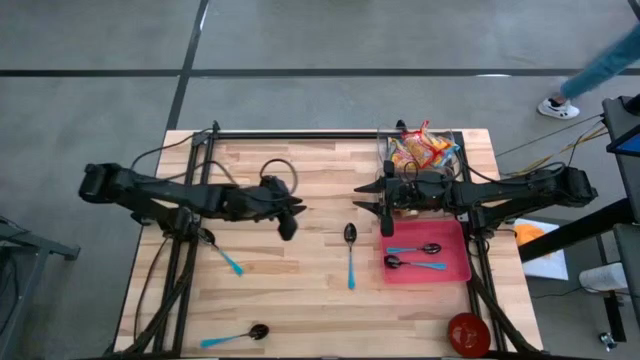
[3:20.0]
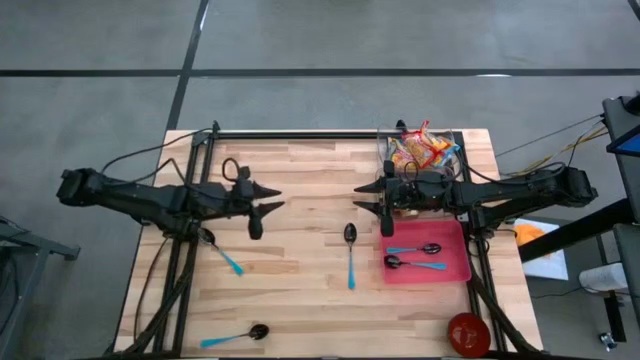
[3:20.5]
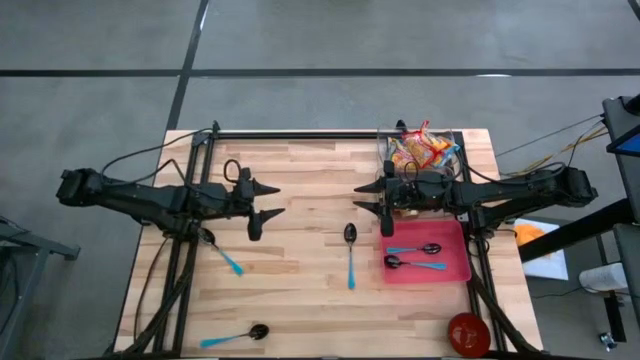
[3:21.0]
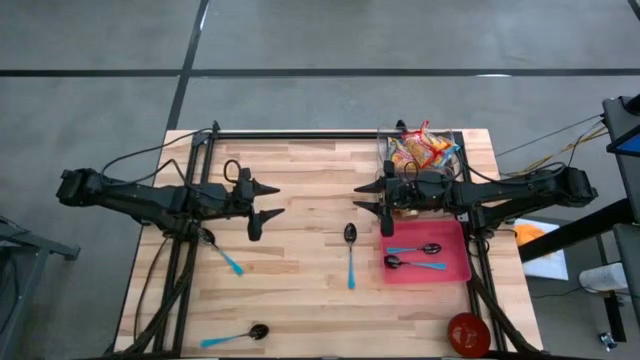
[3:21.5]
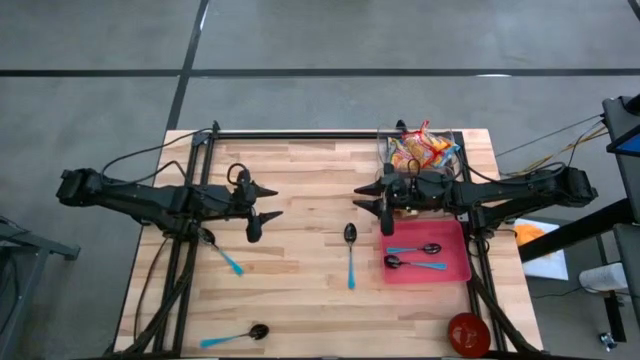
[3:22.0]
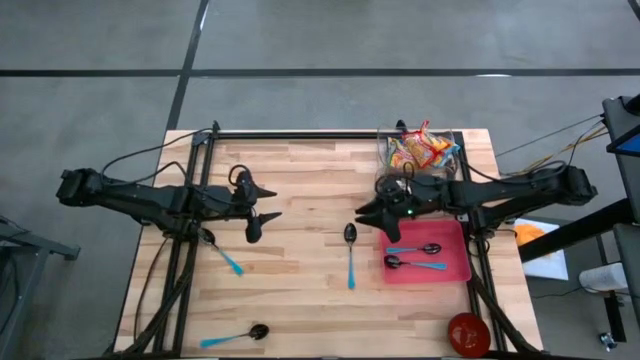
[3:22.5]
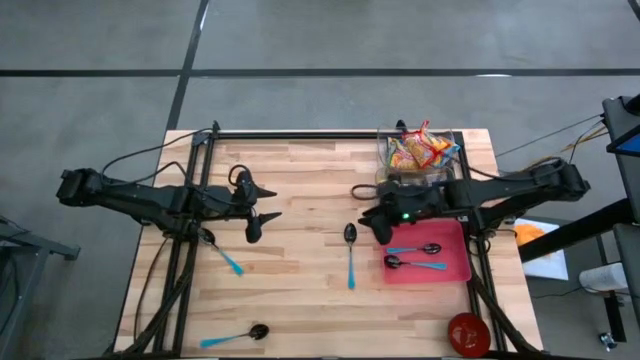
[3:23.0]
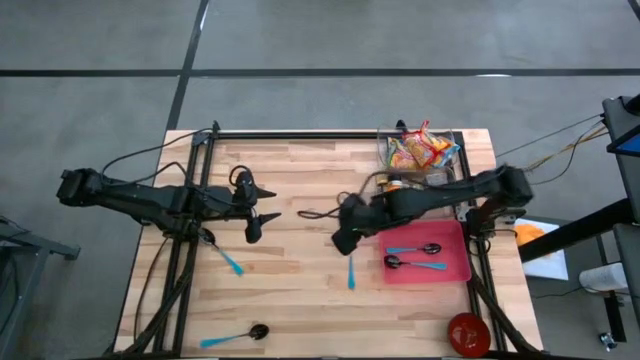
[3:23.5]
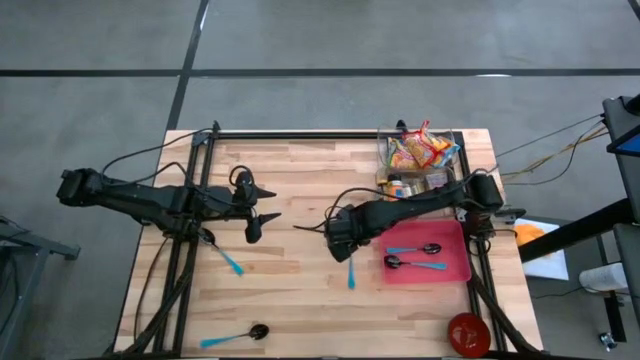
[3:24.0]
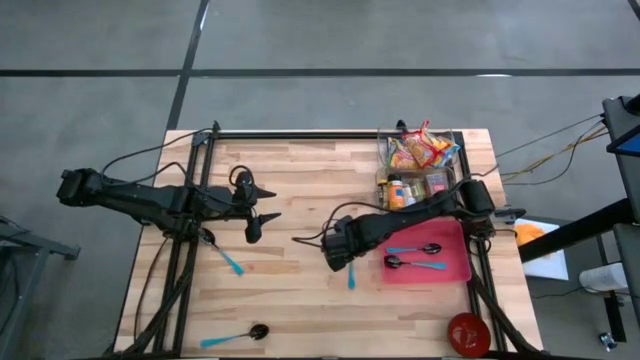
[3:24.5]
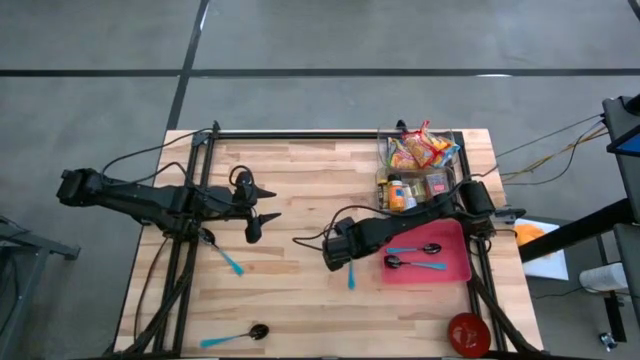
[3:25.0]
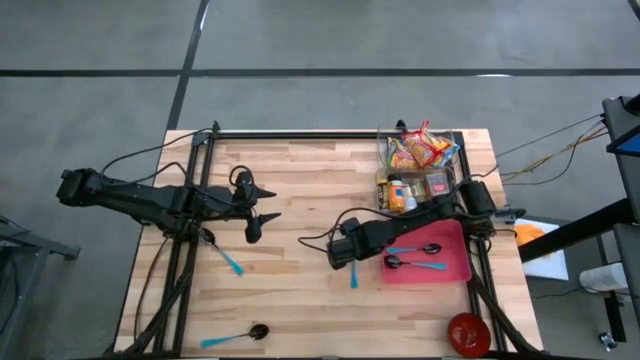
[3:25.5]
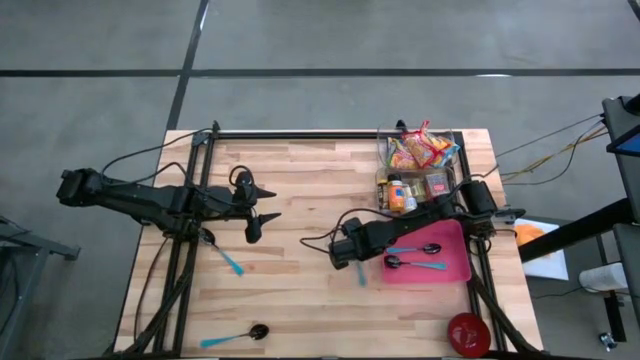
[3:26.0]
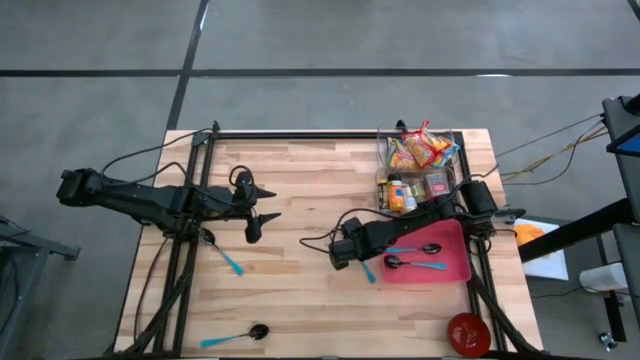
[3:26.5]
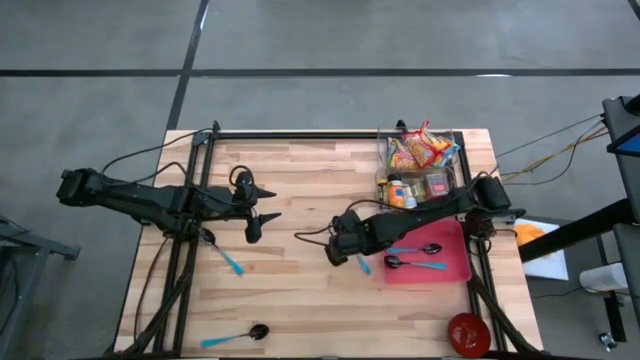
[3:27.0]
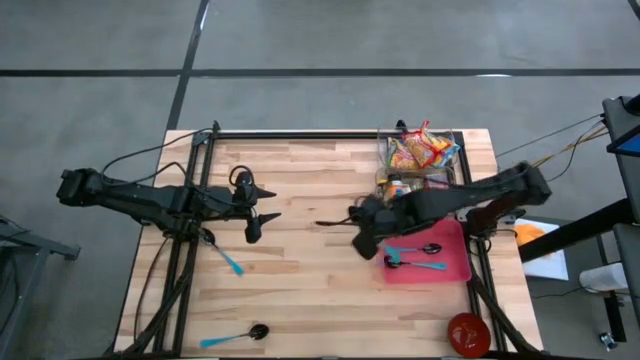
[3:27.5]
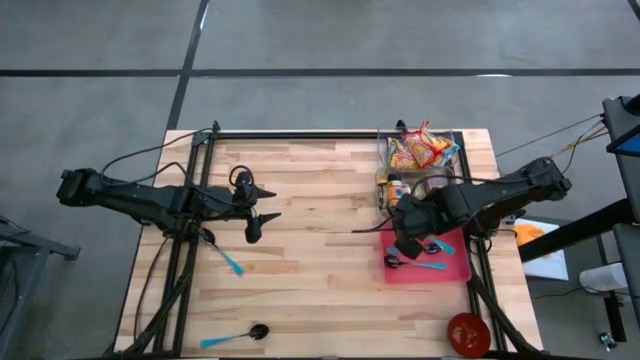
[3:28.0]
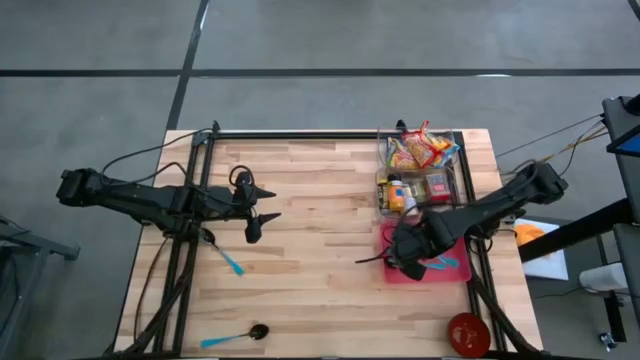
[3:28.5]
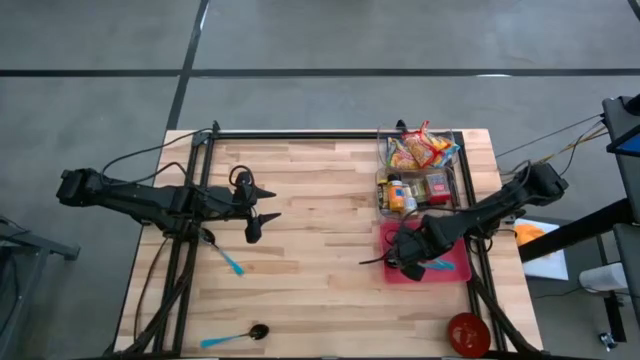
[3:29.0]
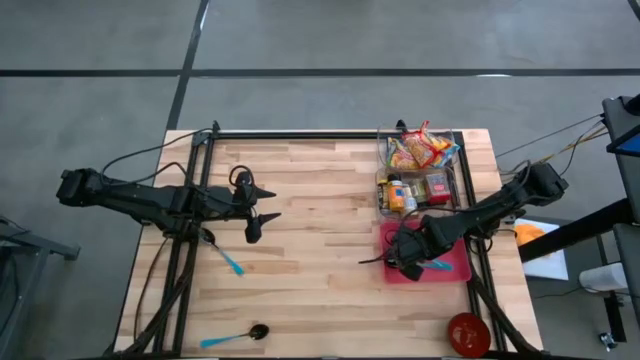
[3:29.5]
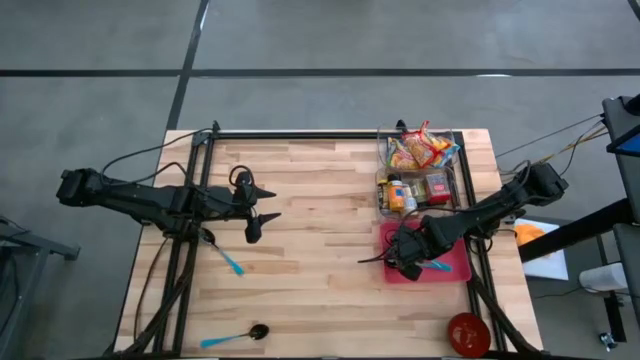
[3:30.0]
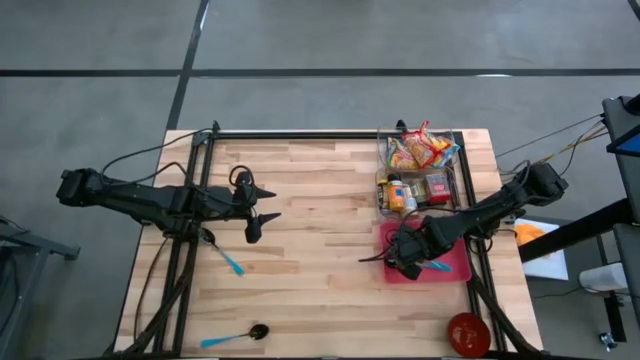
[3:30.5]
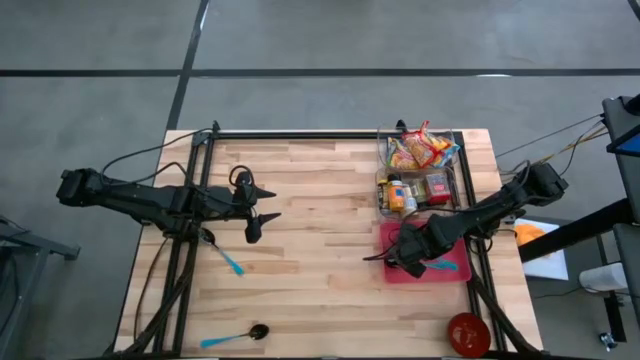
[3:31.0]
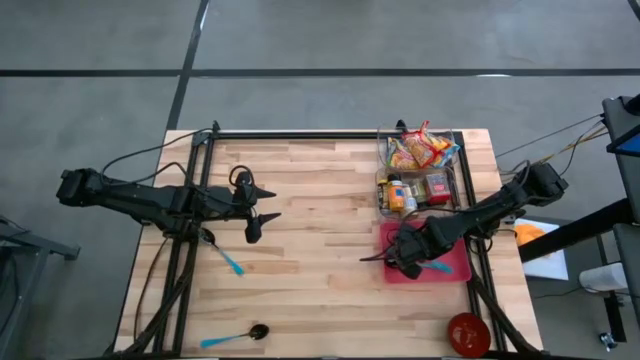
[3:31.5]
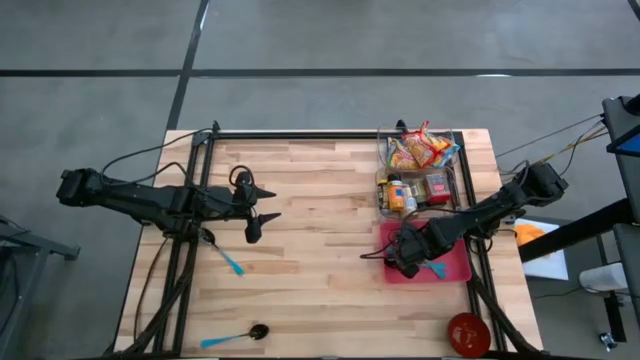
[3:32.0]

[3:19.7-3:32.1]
Put the blue spoon into the red bin

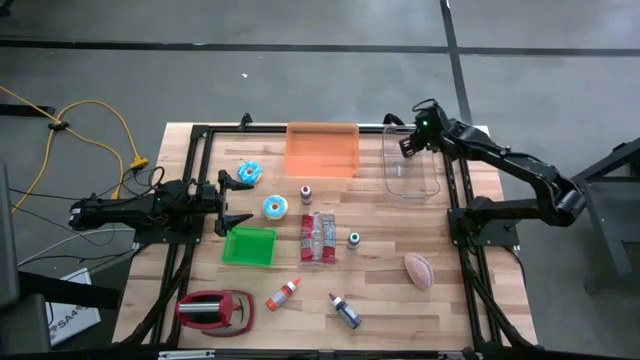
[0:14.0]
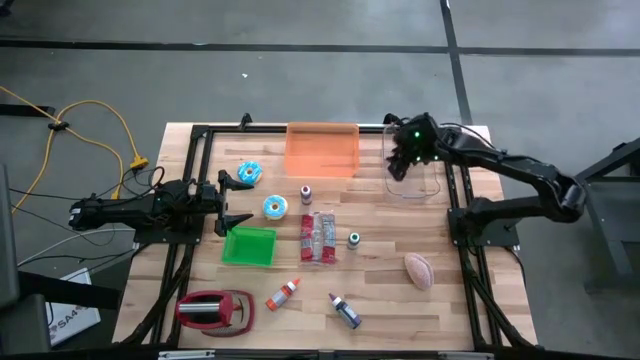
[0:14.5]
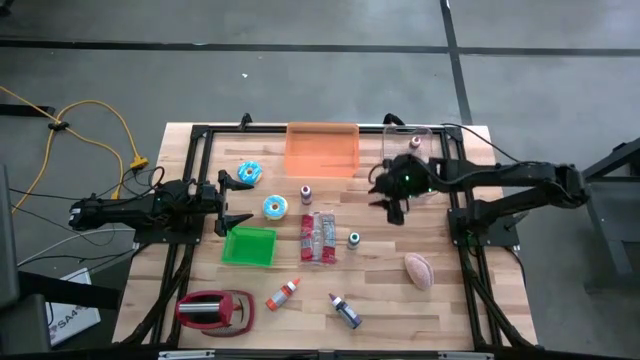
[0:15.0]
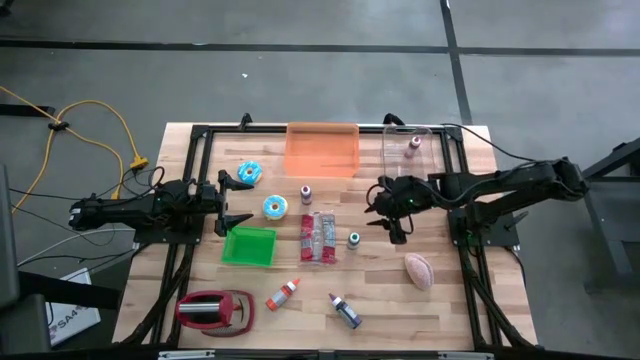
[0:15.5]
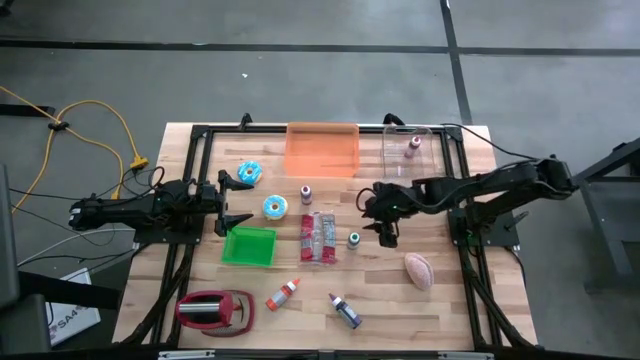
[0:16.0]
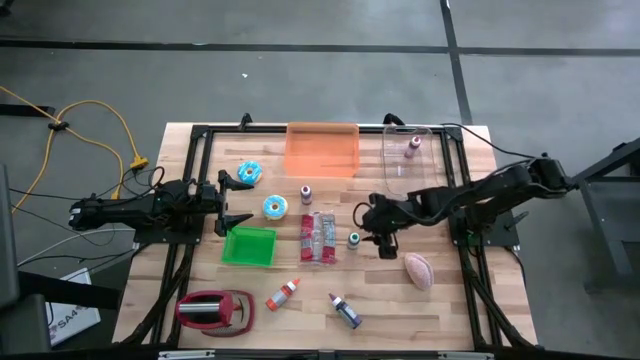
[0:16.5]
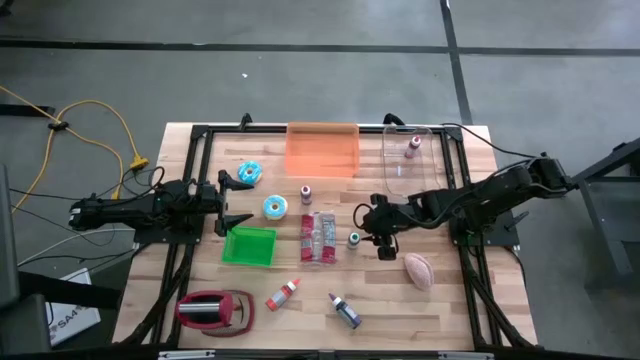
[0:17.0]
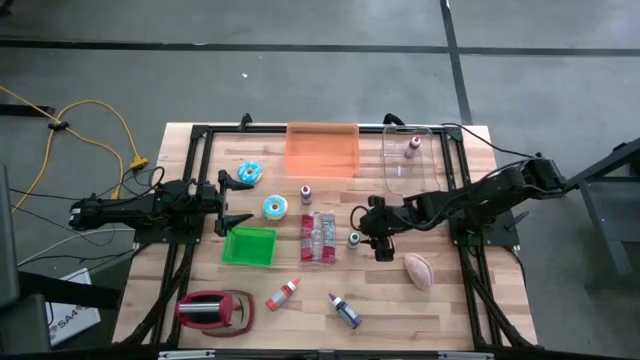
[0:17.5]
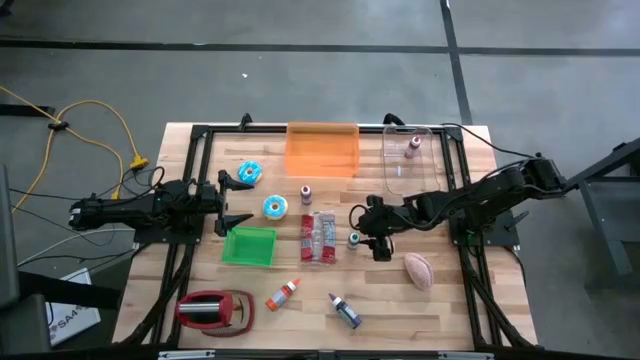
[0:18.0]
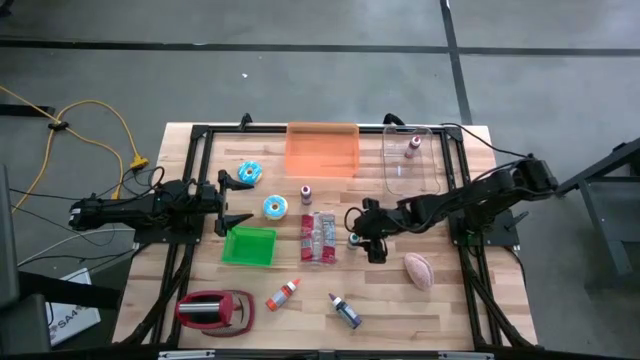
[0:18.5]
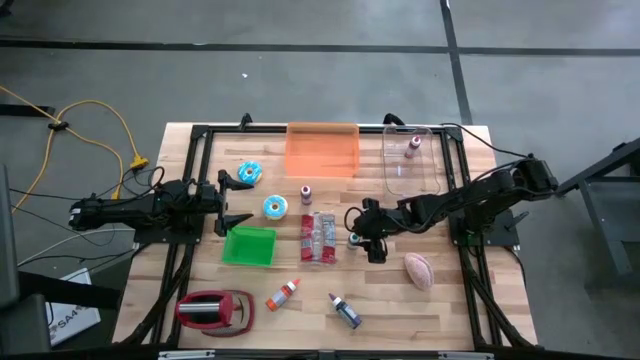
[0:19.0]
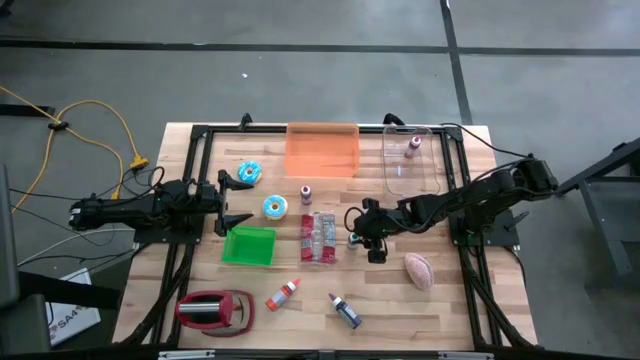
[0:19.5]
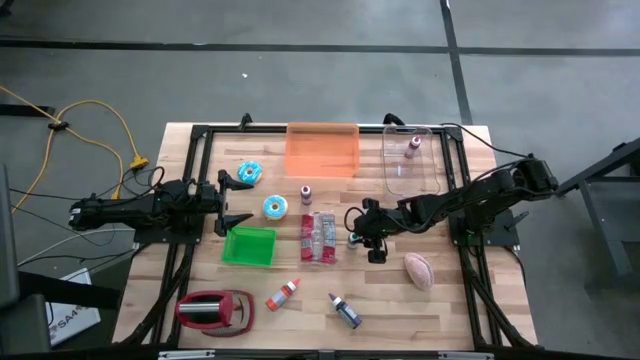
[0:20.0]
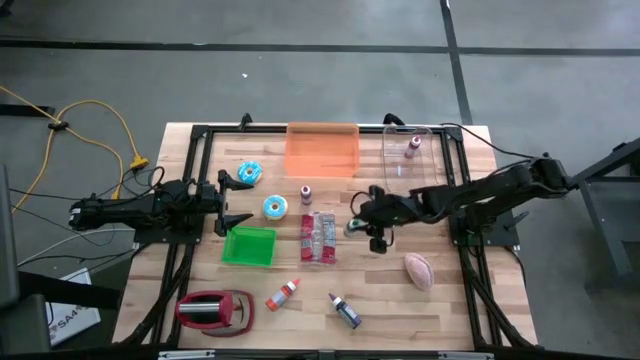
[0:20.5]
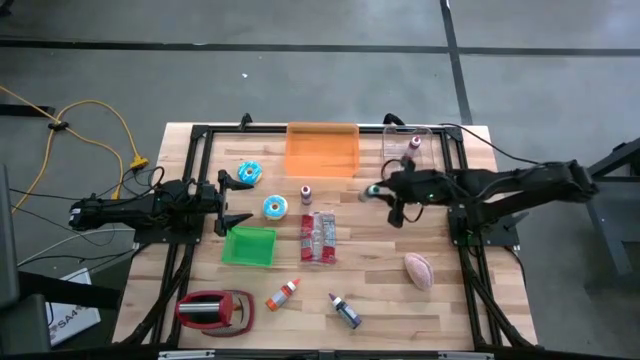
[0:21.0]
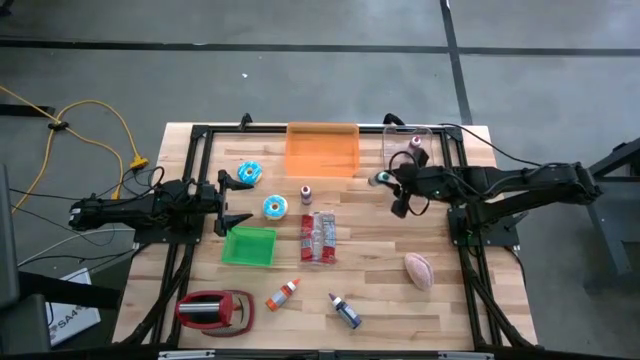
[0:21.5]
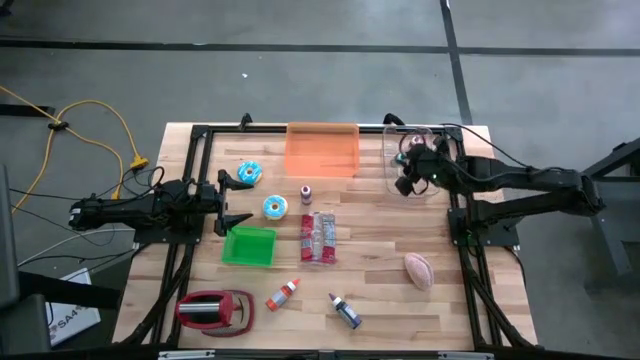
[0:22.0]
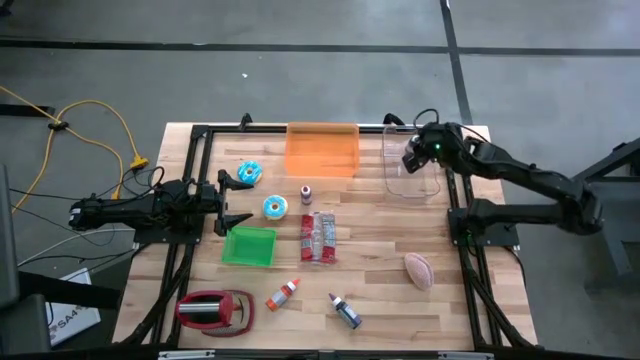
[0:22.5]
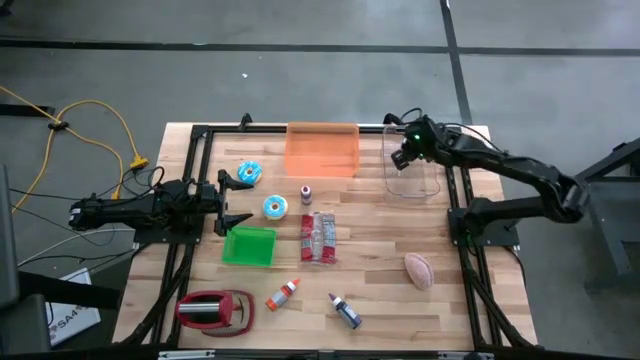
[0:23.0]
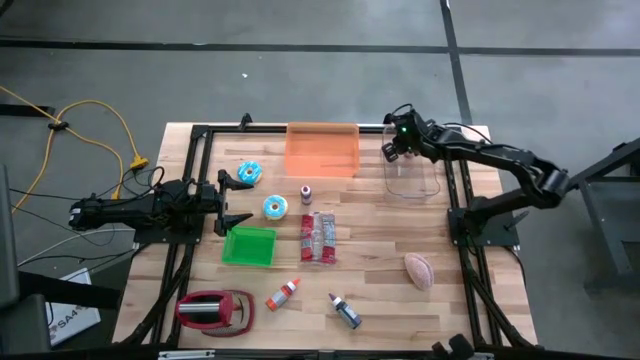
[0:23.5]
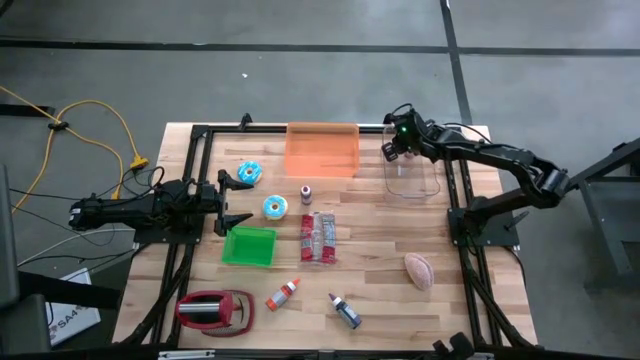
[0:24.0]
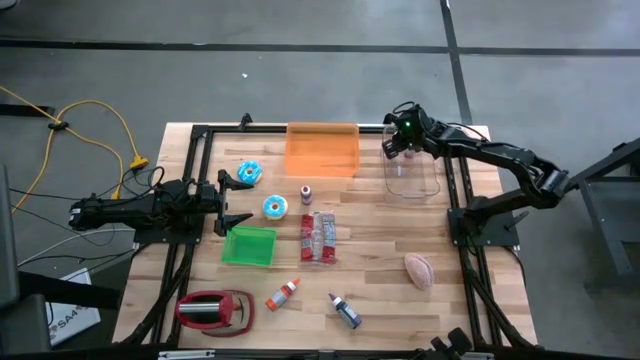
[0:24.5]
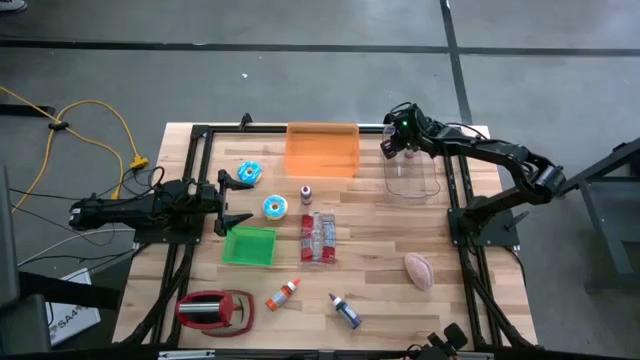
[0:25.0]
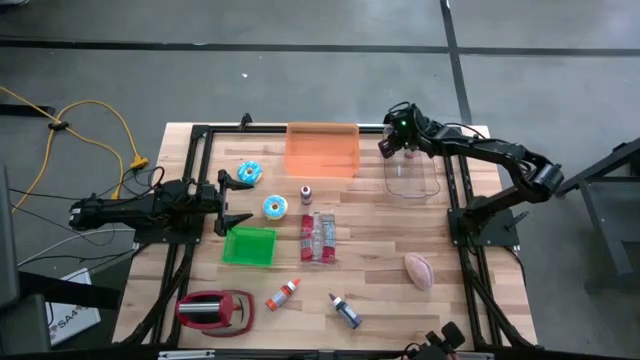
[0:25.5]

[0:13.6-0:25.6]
Put the green food coloring bottle into the transparent bin
